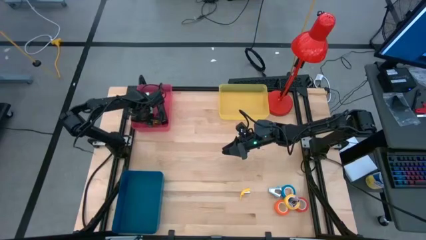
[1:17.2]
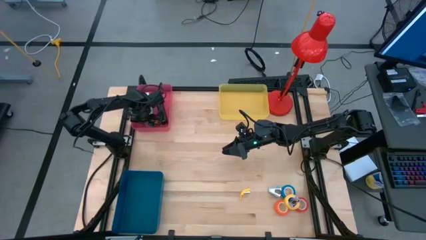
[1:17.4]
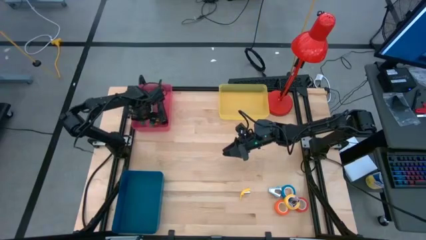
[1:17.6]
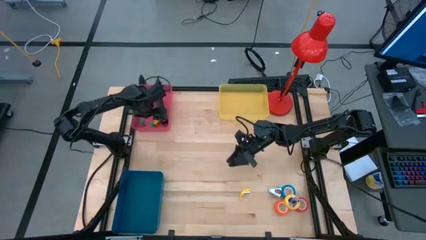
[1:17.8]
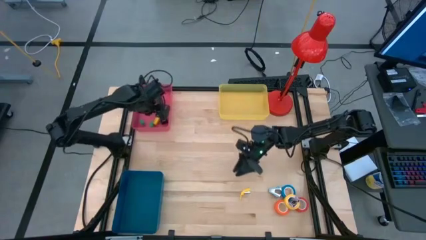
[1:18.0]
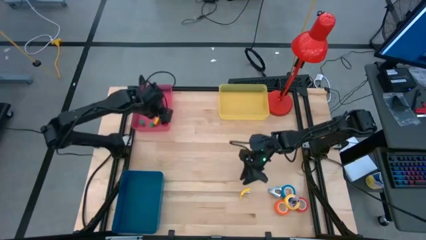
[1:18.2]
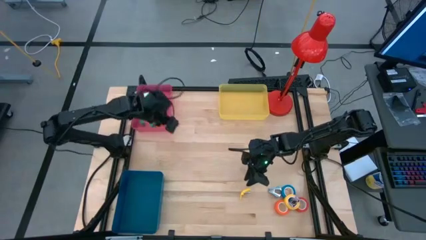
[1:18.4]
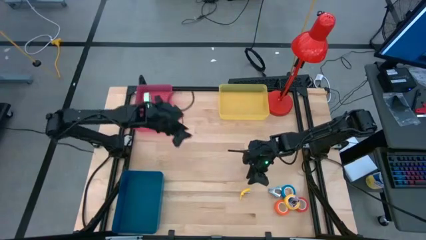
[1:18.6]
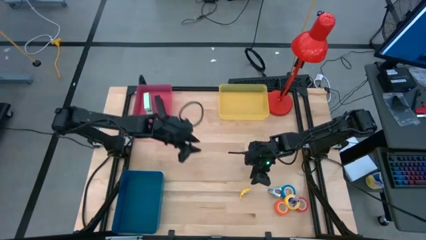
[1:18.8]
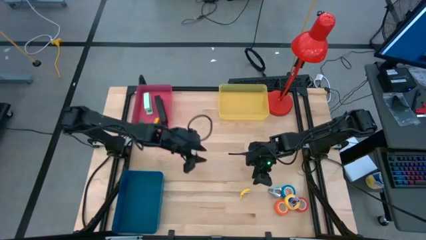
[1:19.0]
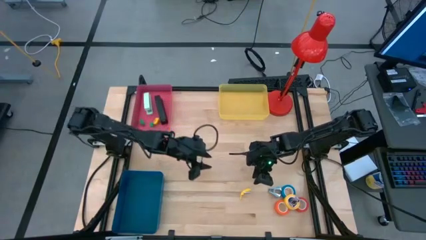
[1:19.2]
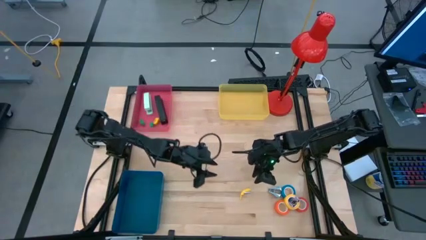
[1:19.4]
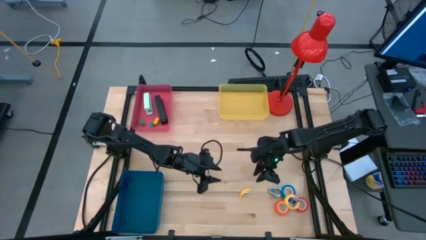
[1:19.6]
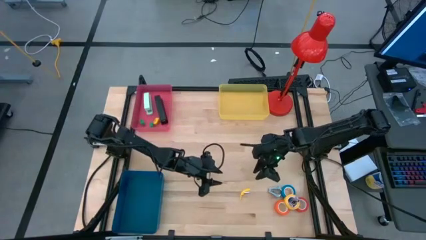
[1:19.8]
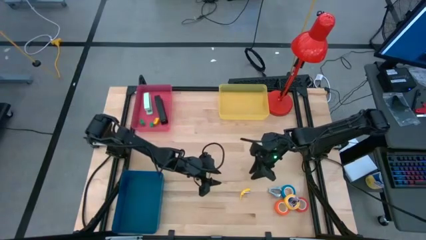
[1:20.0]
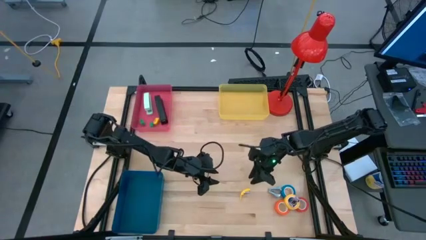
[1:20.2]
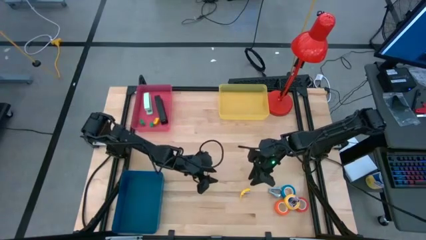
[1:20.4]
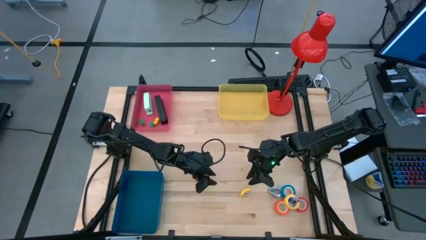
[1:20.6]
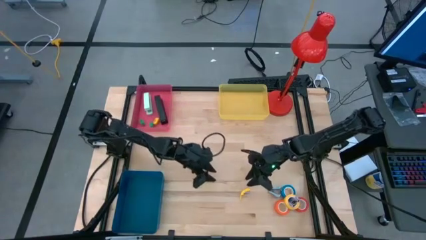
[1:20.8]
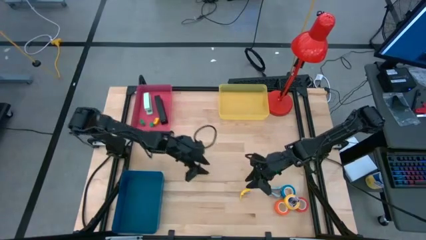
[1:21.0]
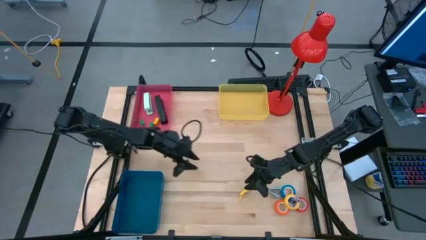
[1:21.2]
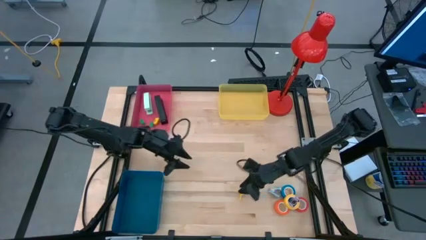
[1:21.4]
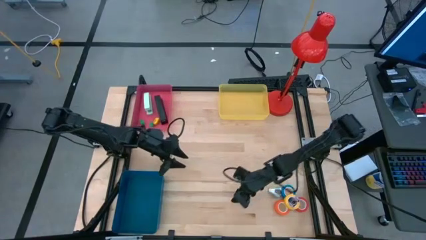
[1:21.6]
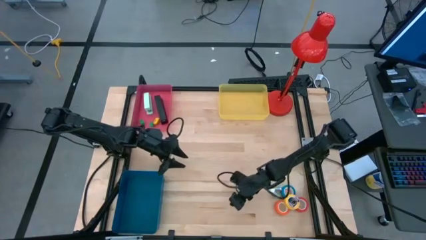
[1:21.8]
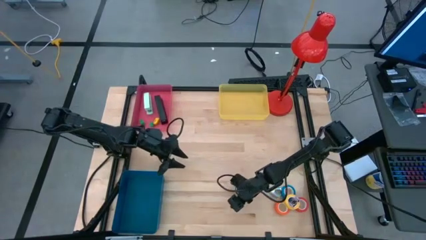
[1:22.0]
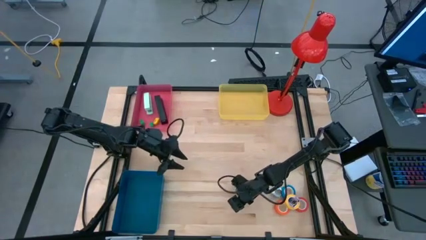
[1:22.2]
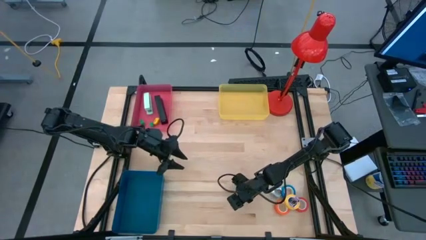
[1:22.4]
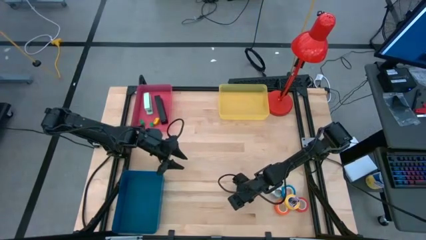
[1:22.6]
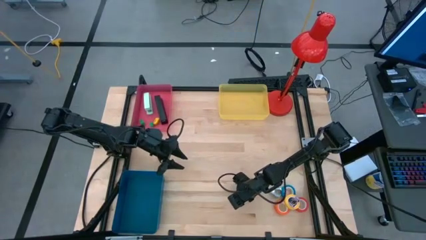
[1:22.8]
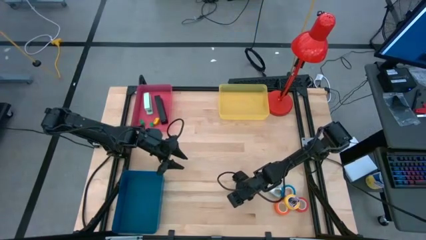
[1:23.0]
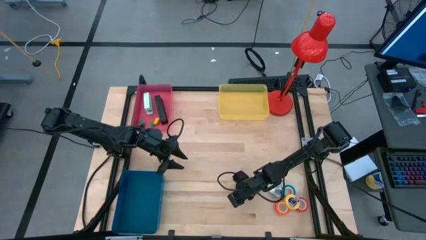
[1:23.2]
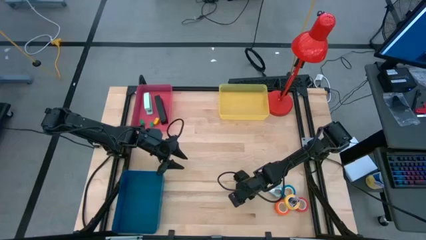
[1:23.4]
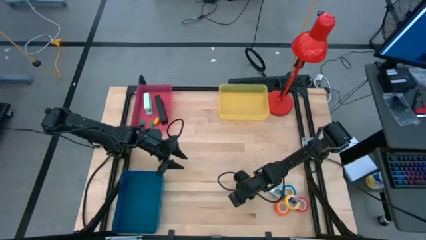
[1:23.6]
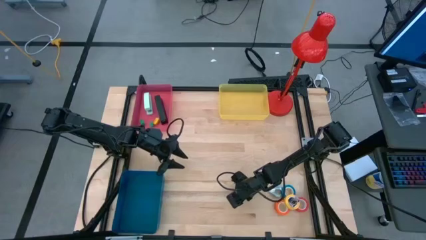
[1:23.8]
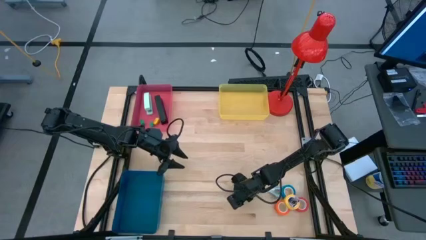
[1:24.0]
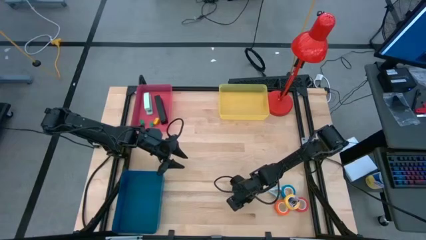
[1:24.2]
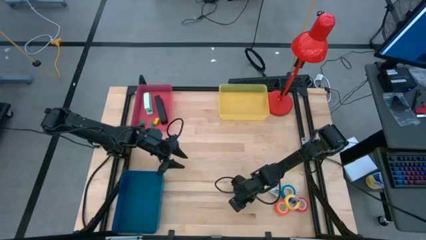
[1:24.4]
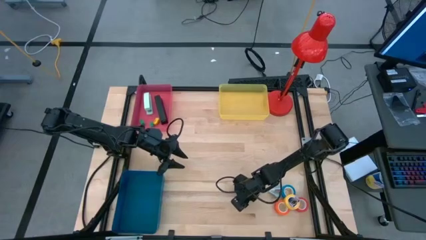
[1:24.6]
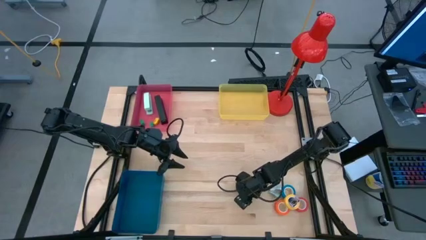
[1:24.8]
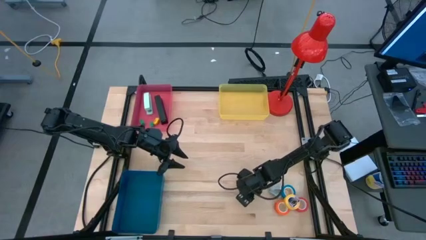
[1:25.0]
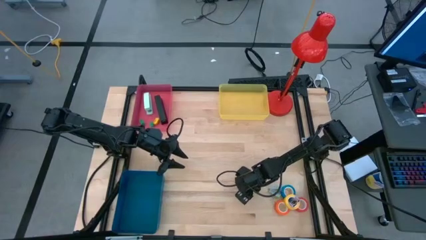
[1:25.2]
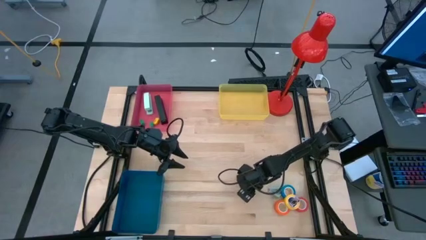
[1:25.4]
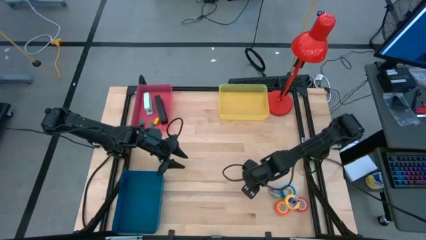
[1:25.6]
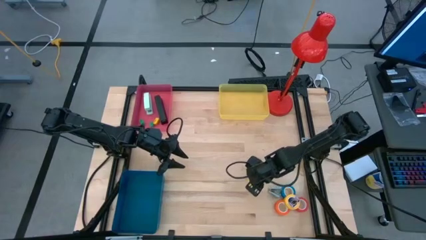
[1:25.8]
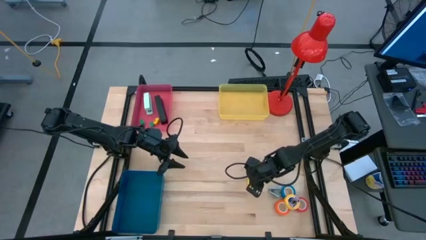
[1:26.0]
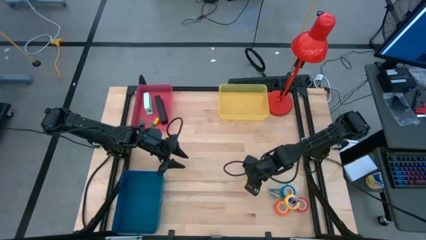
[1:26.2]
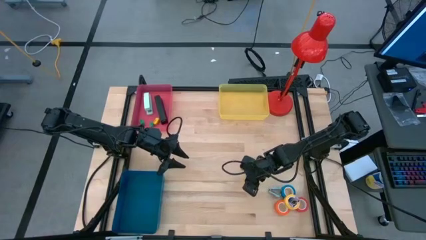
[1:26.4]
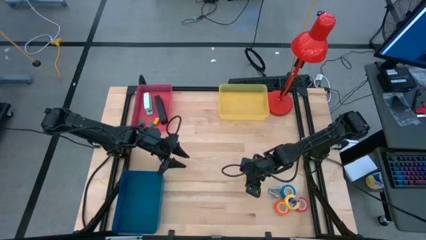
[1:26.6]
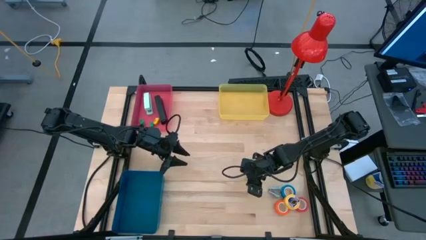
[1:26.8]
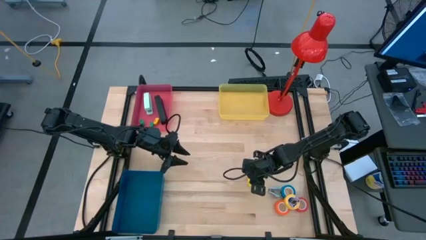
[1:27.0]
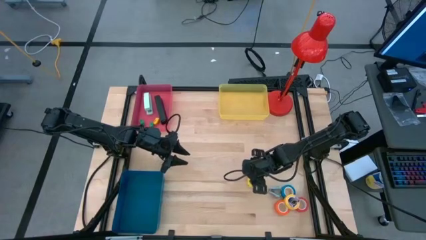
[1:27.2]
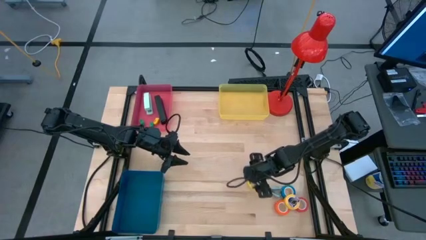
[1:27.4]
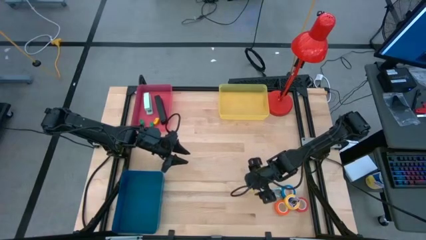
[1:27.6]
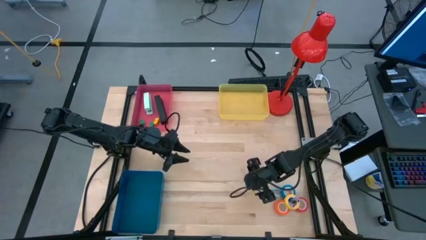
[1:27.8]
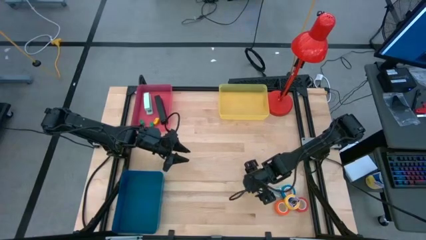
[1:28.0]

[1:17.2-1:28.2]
Task: Pick and place Stapler, Stapler remover, tape
Put the yellow stapler into the red bin
